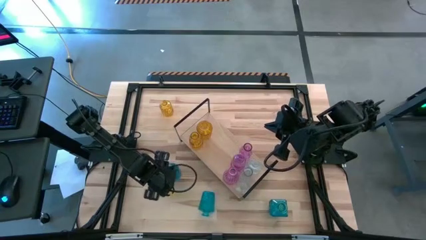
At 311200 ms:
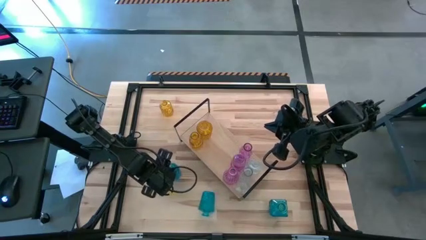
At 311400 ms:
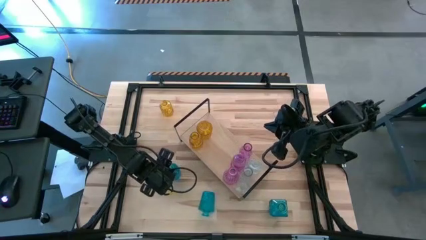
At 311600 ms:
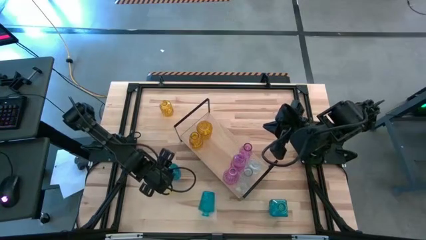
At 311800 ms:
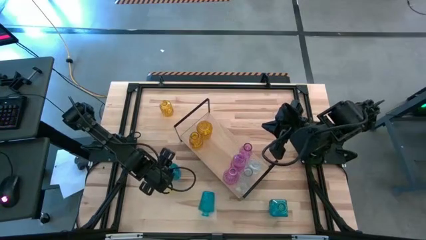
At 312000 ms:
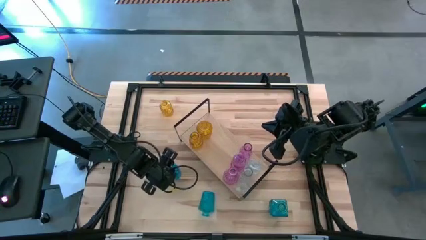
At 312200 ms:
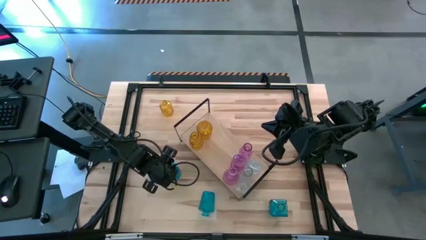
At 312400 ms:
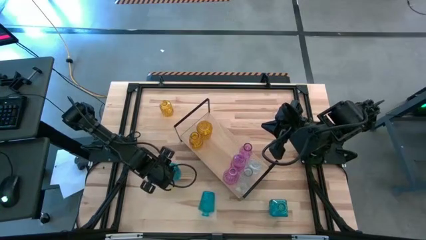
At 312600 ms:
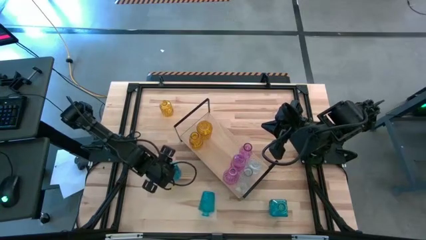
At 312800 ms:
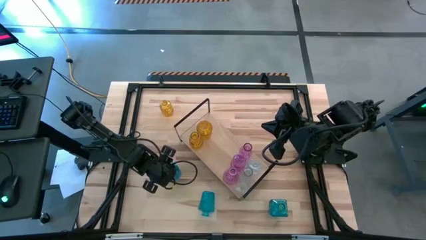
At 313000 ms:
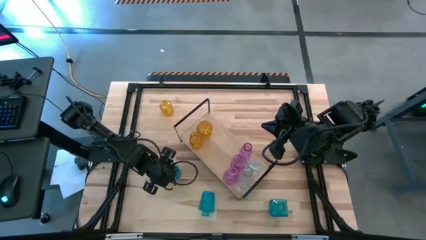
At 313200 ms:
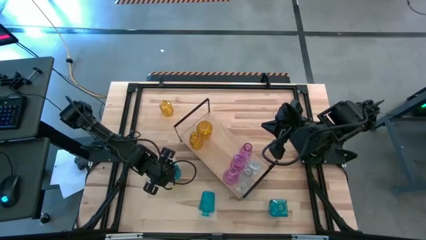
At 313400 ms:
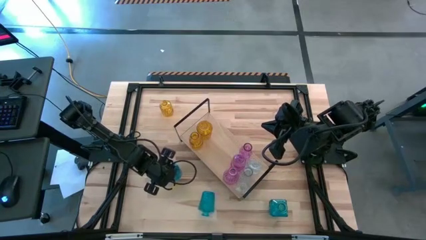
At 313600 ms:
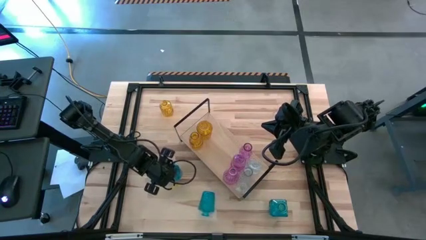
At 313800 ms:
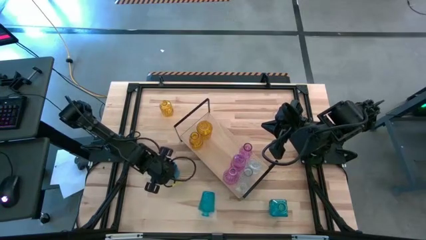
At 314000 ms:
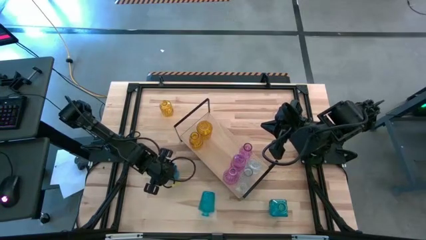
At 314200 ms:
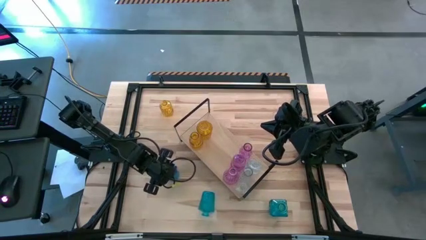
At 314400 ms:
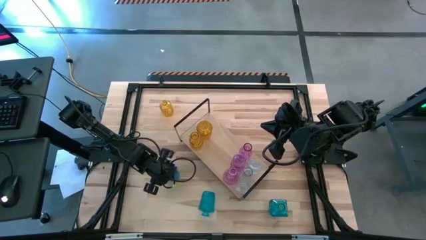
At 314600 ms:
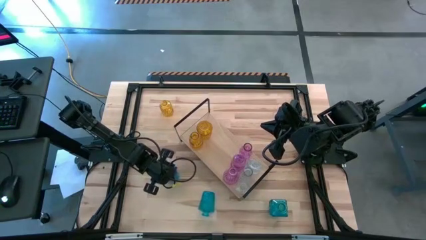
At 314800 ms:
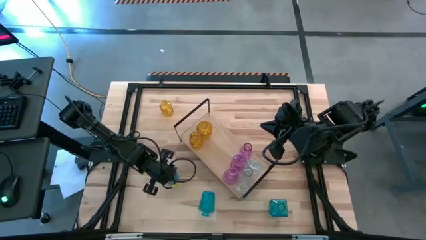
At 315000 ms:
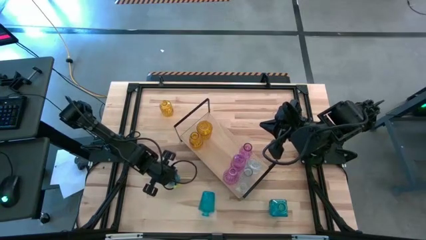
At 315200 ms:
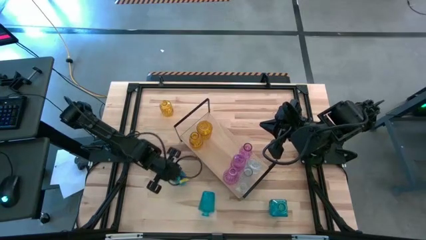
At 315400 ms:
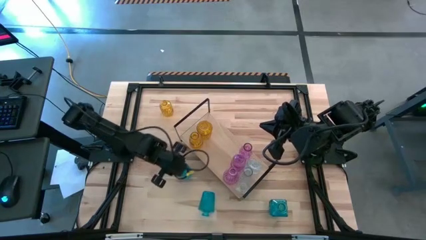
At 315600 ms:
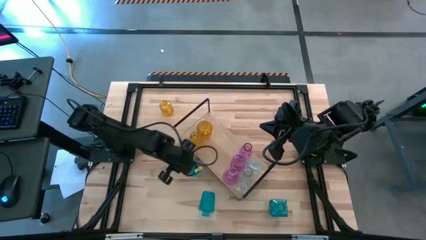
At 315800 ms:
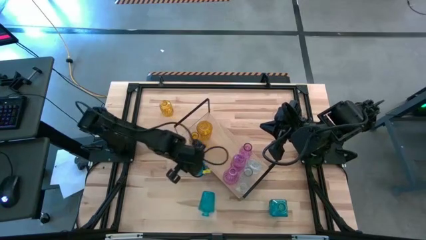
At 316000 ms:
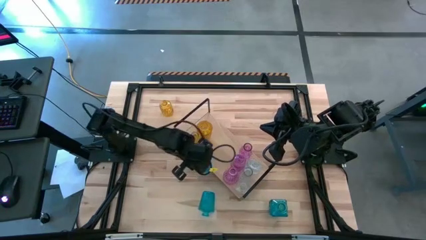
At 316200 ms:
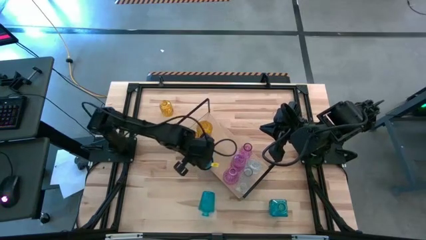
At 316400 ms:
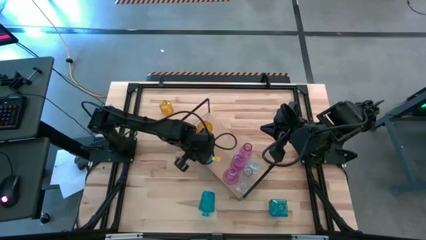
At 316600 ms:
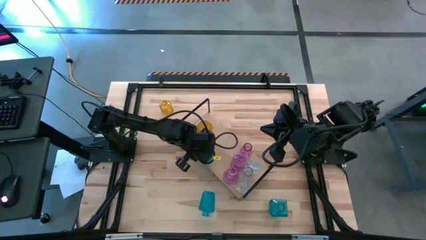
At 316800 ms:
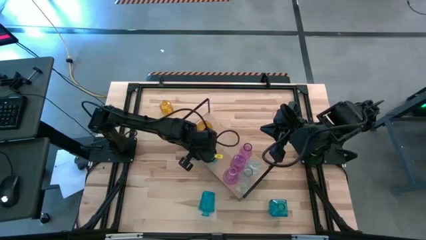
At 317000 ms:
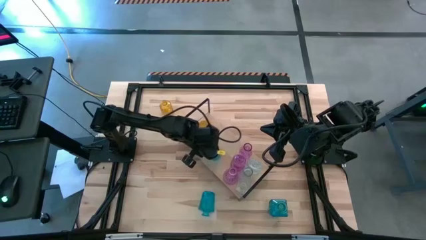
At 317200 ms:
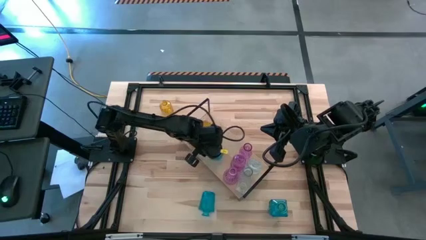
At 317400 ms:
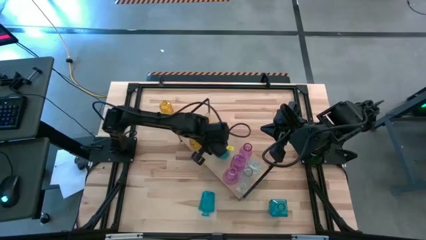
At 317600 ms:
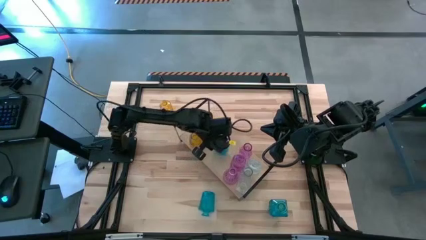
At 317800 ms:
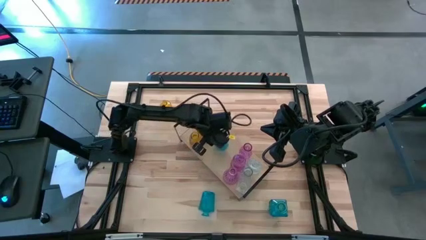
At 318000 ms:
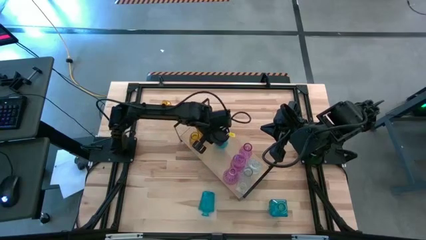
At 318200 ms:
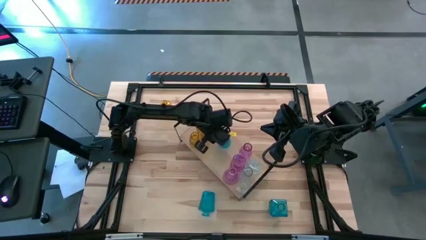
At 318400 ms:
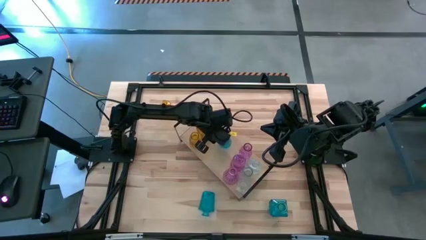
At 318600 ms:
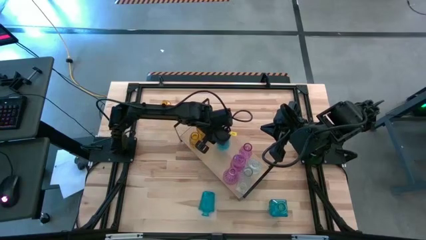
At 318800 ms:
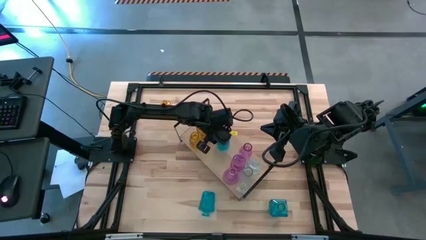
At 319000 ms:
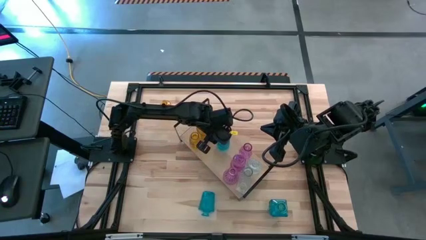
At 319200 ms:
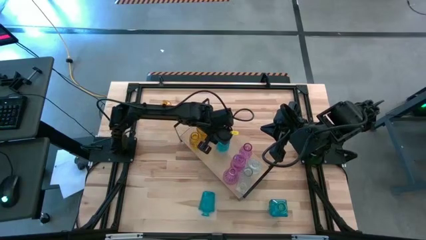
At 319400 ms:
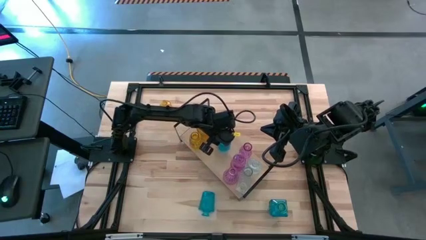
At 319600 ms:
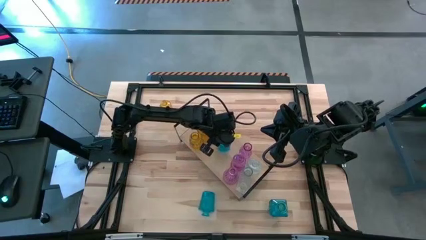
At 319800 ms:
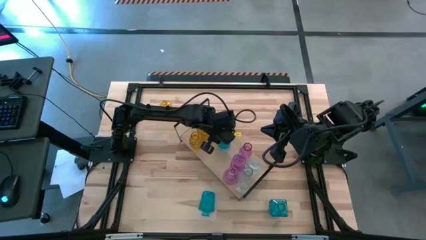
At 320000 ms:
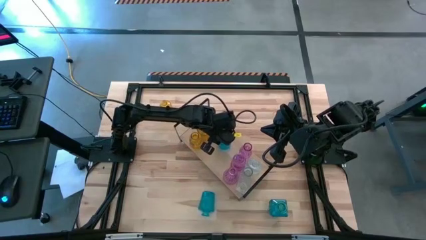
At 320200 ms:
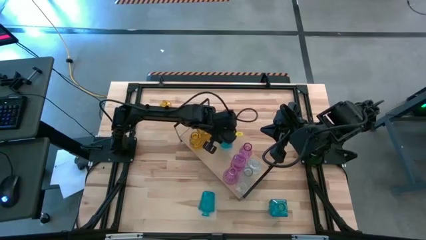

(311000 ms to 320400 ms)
Task: sort vases onto shelf
Put the left blue crystal vase on the shelf
